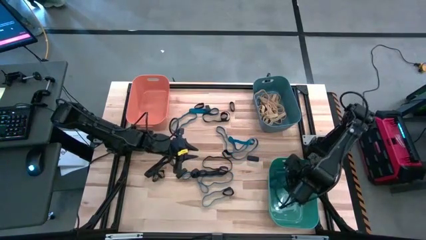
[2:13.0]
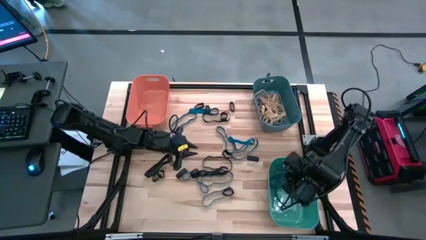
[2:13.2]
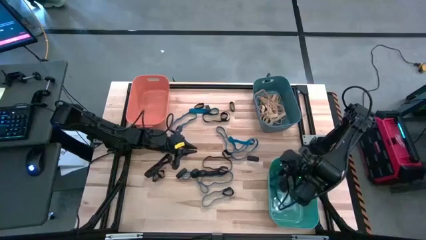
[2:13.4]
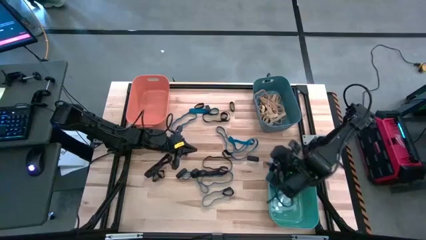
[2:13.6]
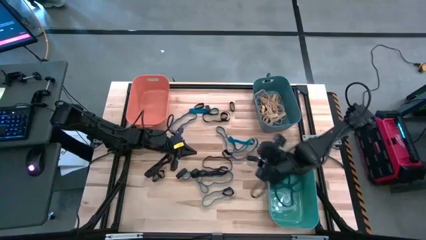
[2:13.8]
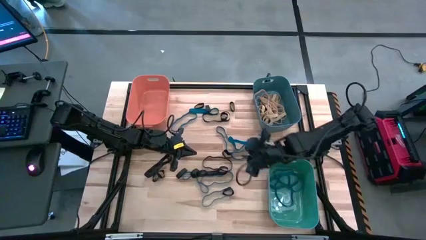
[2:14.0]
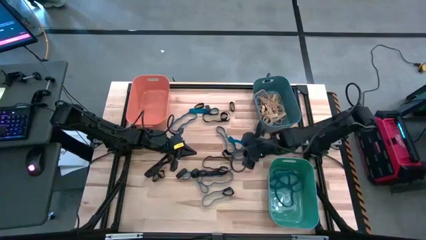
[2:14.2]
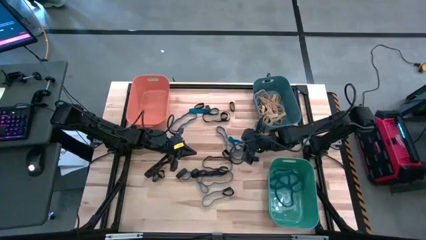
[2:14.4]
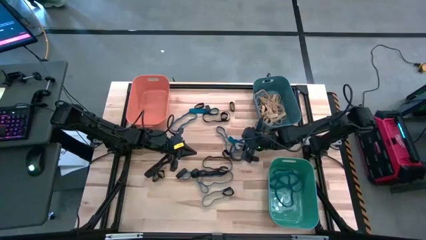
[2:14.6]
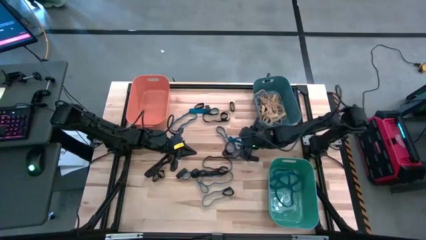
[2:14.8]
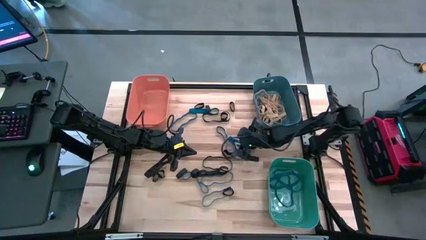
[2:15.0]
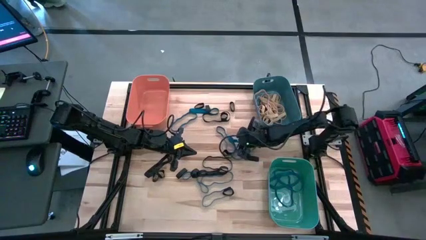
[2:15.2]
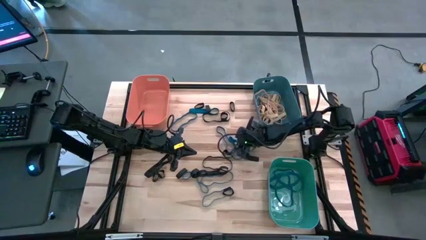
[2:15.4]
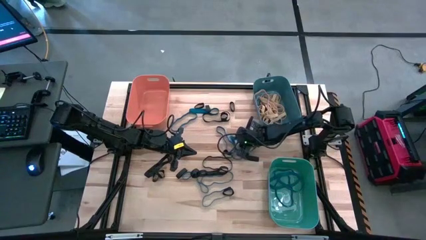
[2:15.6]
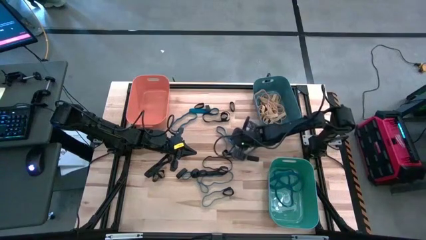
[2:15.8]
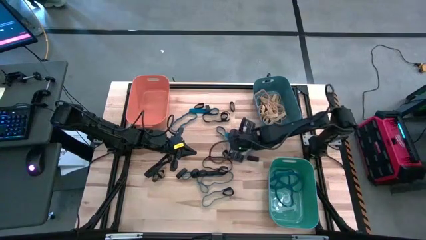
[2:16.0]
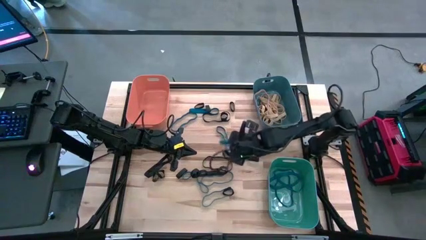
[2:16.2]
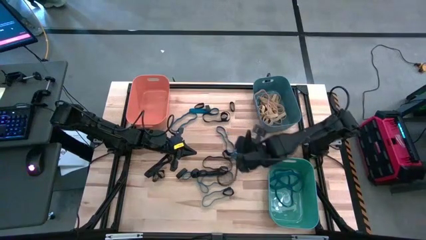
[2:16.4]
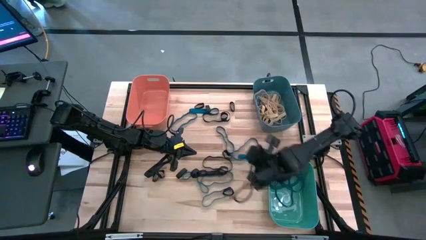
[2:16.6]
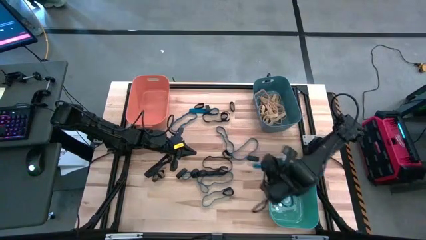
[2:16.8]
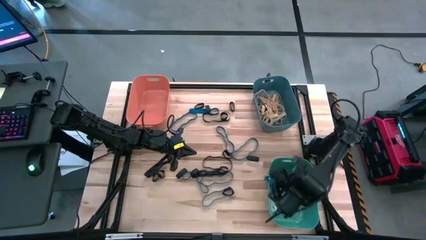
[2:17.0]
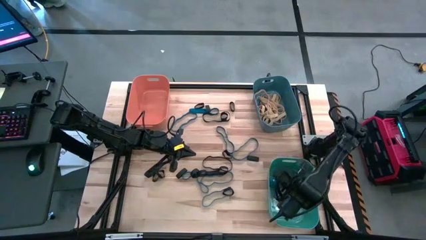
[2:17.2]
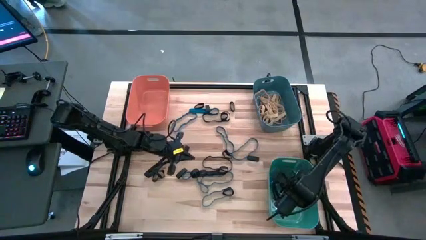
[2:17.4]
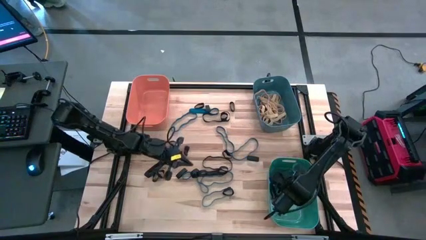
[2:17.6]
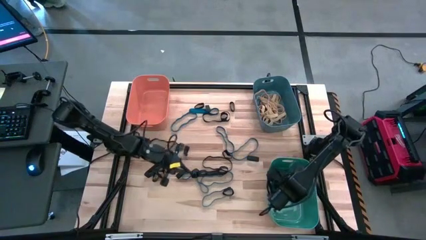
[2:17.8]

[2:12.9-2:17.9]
Task: Sort rubber bands into baskets
Put the blue rubber band into the green bin

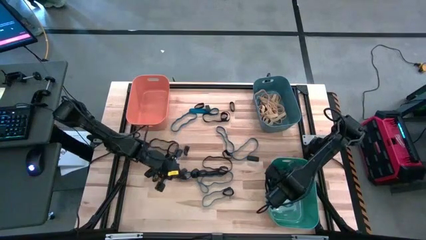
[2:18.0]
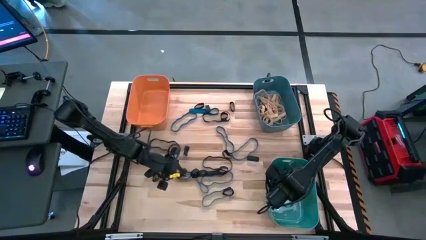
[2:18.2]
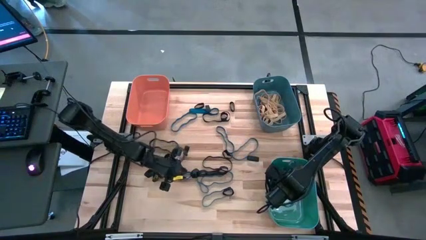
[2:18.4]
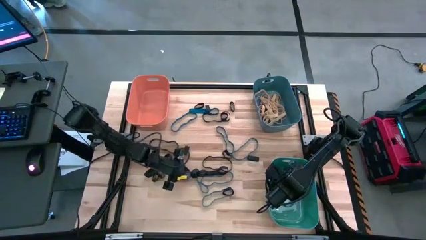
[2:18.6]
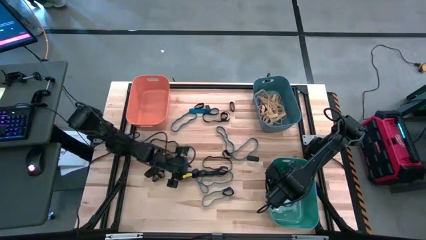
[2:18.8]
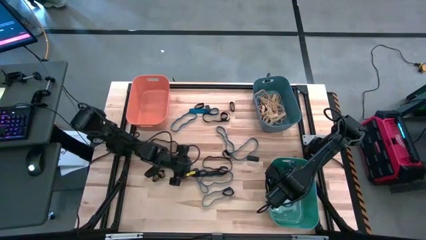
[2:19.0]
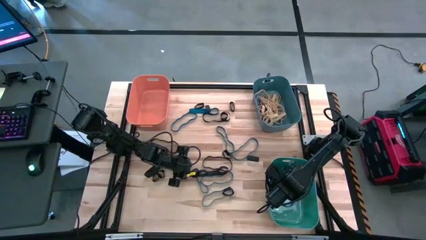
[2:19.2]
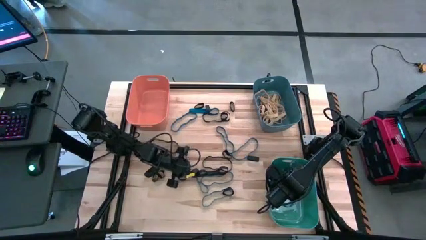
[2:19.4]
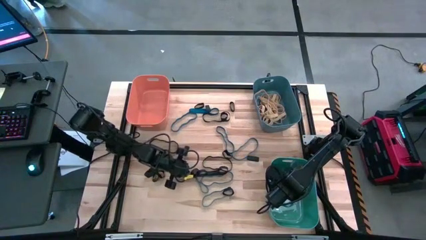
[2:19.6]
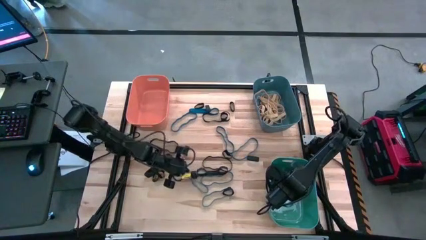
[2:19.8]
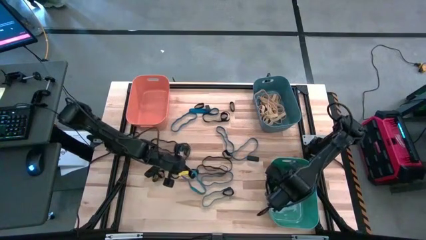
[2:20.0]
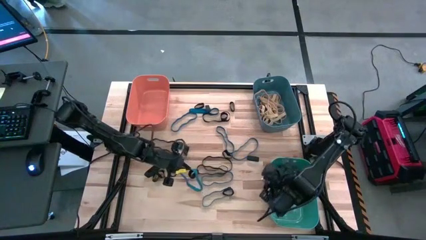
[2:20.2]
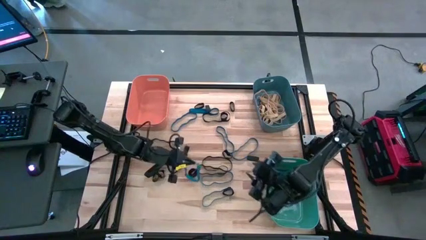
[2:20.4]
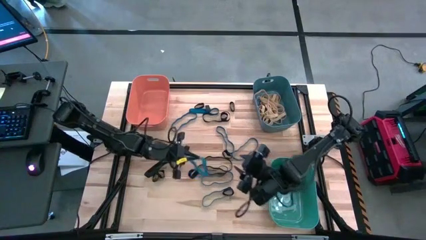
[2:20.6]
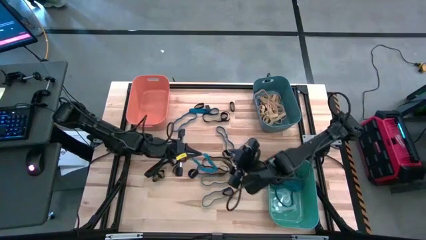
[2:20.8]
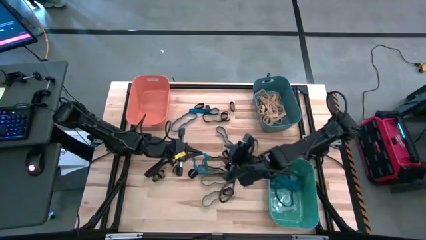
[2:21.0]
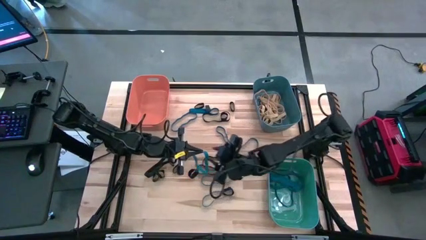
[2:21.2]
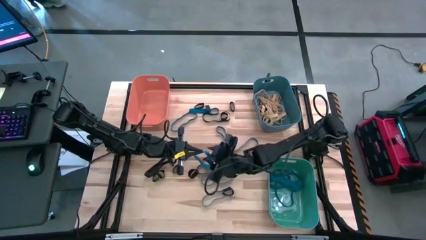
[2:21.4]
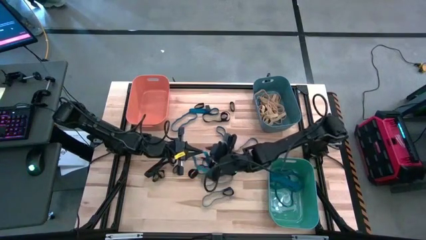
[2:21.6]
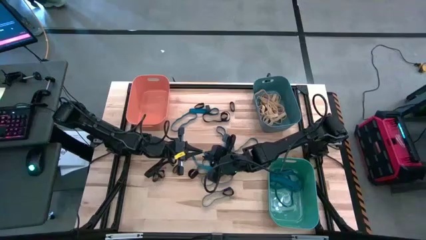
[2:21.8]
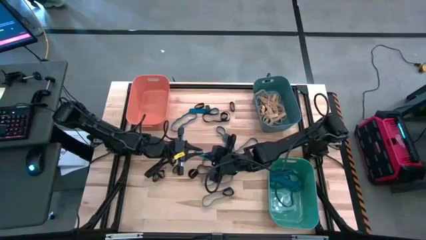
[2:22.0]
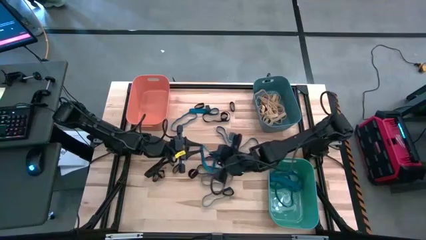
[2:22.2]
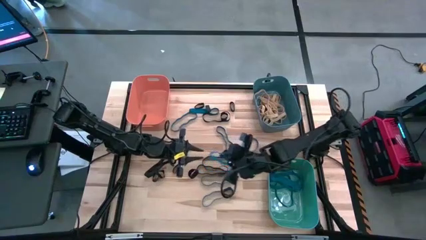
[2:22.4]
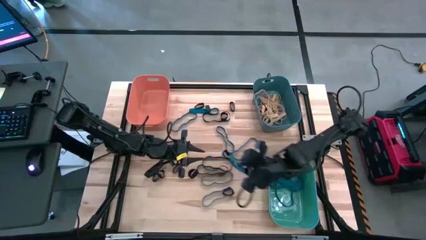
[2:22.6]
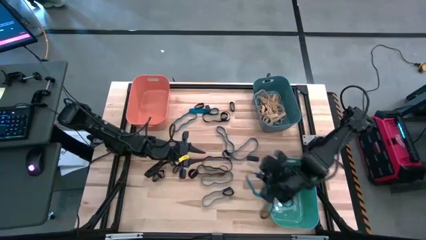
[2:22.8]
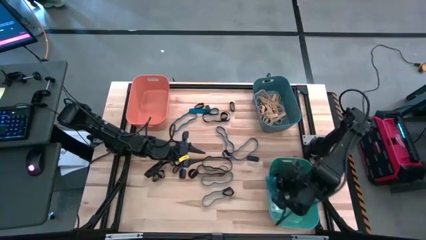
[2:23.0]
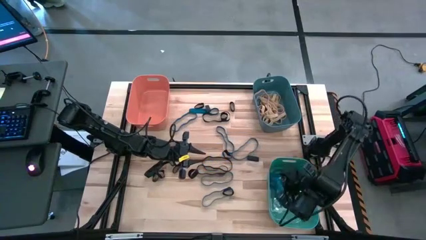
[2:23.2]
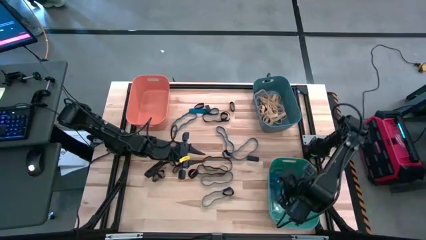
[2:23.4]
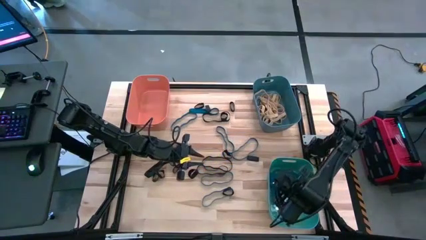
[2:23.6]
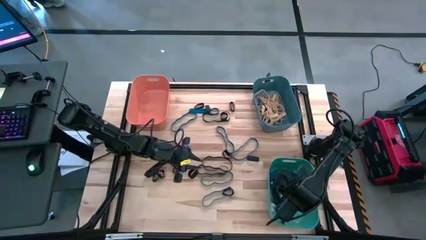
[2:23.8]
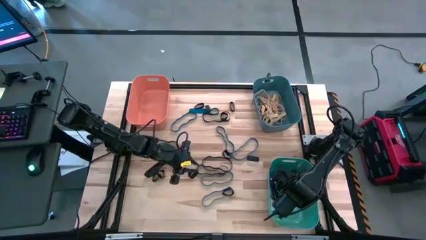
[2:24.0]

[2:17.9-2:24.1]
Put the blue rubber band into the green bin

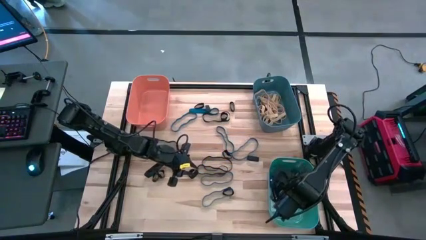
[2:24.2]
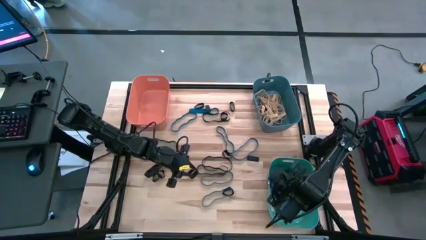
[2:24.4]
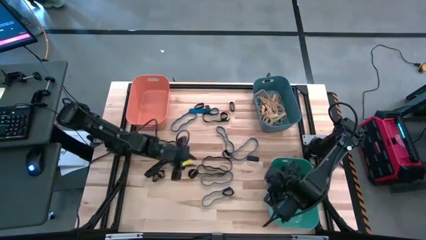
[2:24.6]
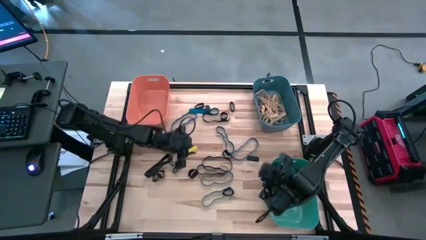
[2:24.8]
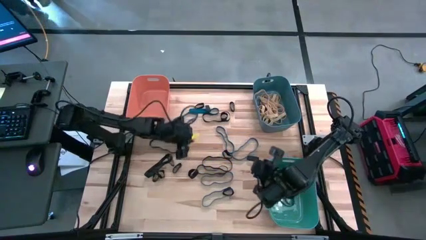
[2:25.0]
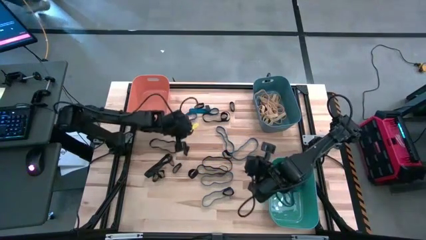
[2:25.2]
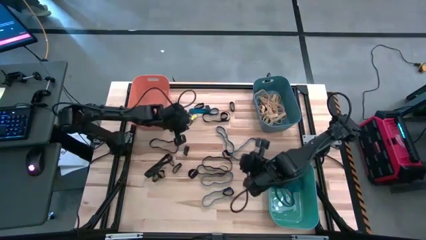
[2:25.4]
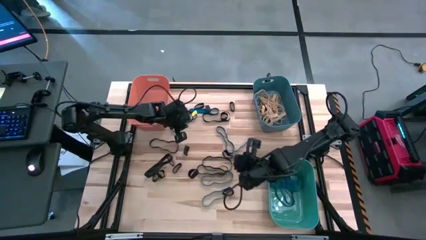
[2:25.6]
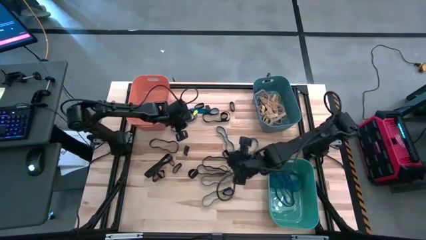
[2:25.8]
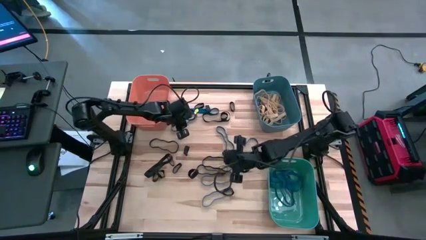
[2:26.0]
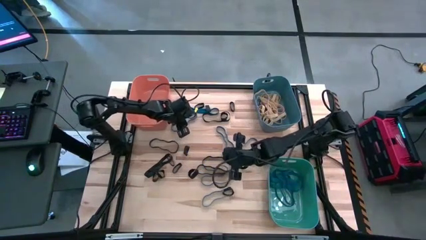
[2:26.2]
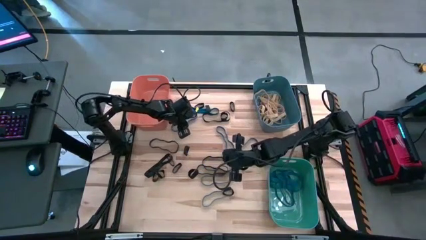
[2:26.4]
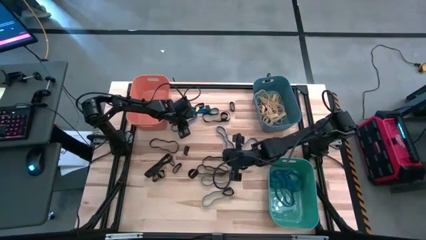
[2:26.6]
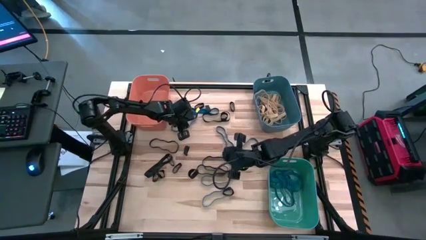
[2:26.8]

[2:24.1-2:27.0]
Put the blue rubber band into the green bin

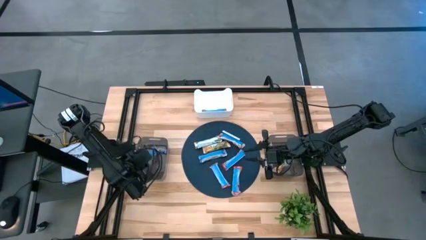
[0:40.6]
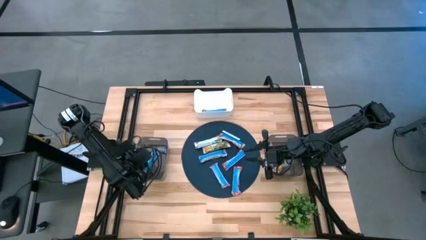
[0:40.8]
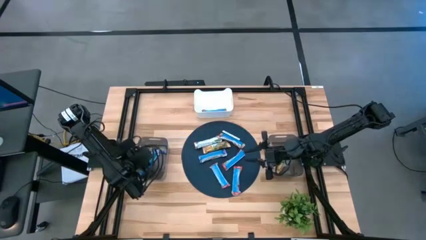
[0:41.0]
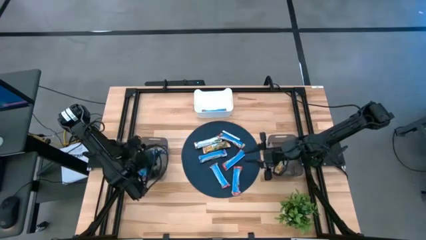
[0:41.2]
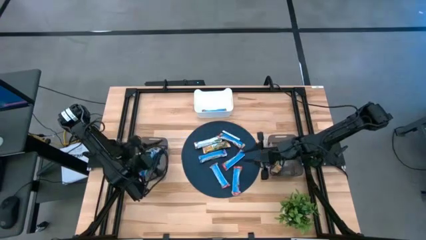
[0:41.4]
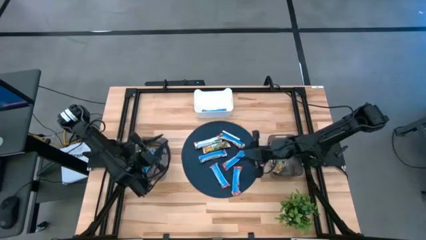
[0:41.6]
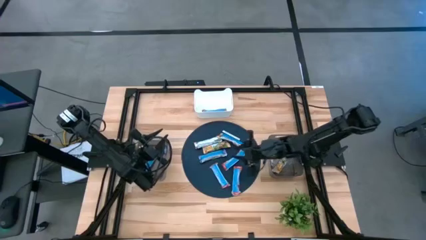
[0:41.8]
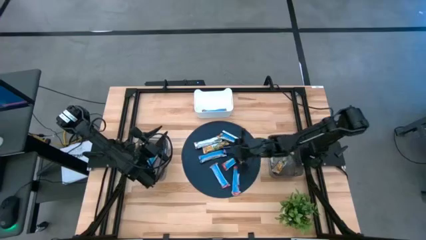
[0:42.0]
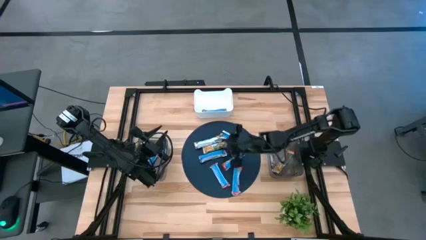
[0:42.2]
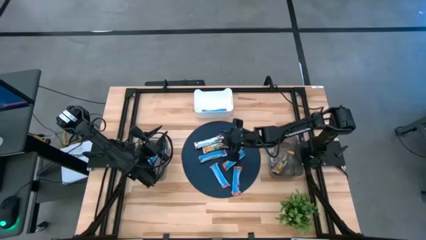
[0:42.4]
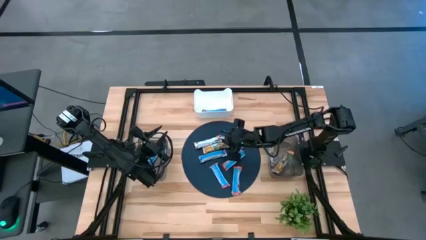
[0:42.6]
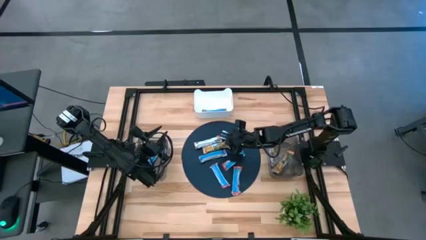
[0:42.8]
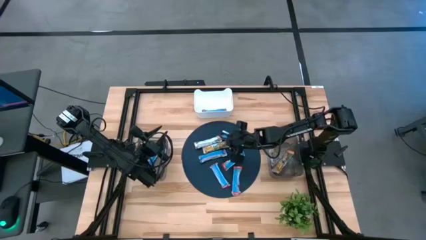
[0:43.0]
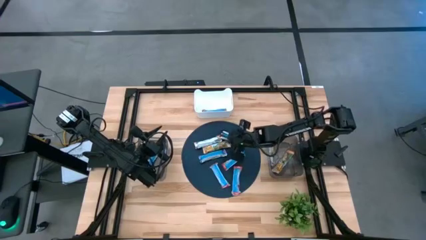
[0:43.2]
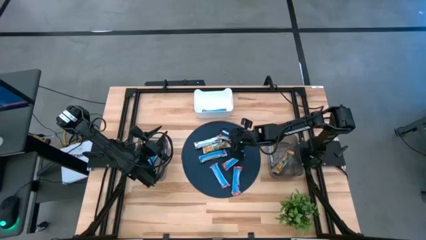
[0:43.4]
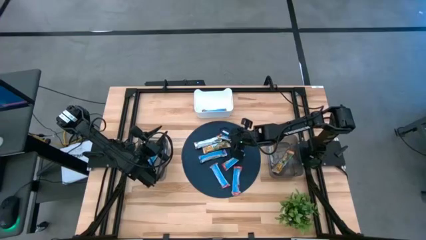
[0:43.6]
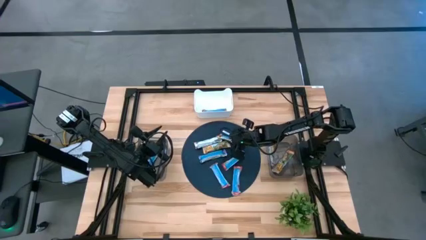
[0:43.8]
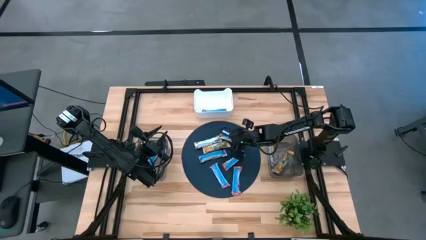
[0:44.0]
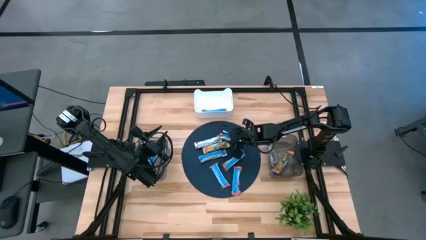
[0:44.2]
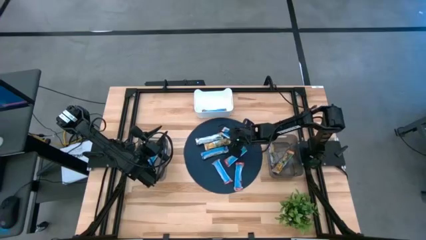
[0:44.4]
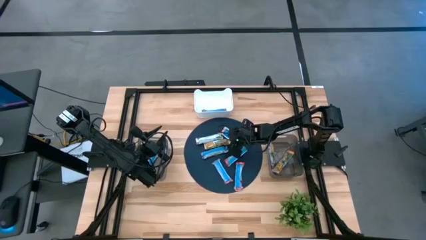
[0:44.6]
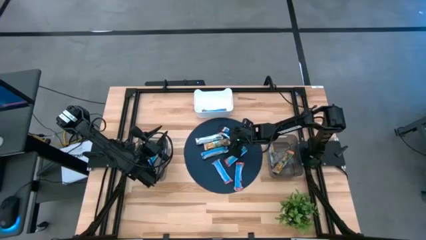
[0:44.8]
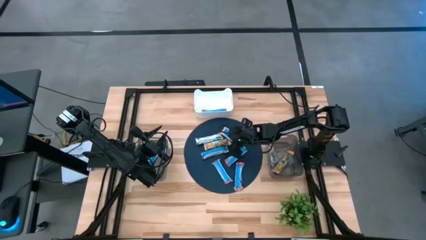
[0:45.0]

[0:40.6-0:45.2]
Task: Pick and place Granola Bars by type
Put the orange granola bar into the right black bin
